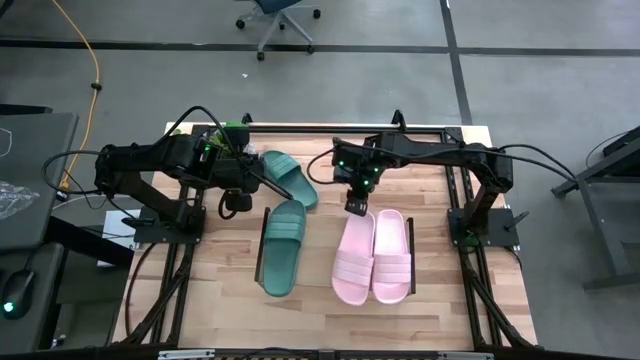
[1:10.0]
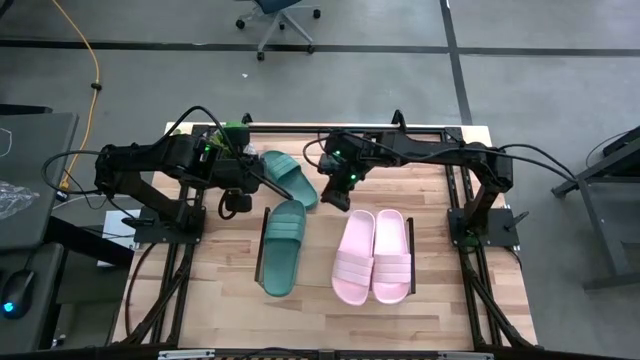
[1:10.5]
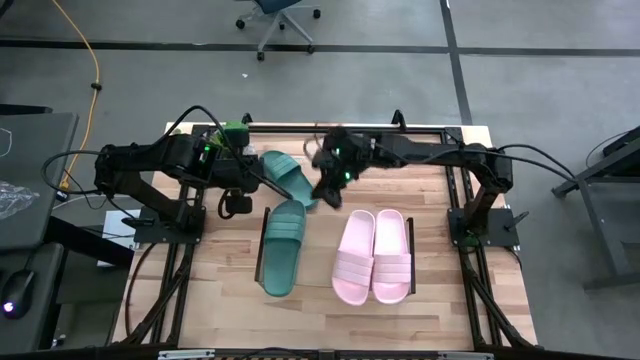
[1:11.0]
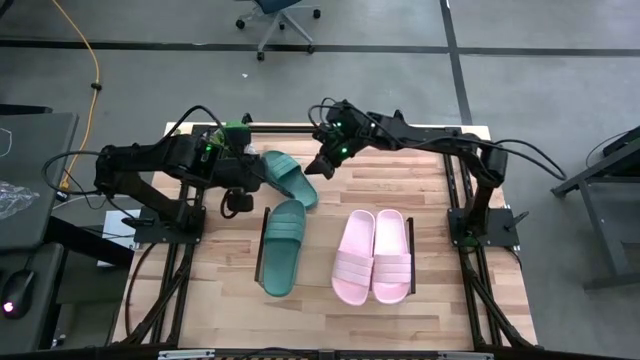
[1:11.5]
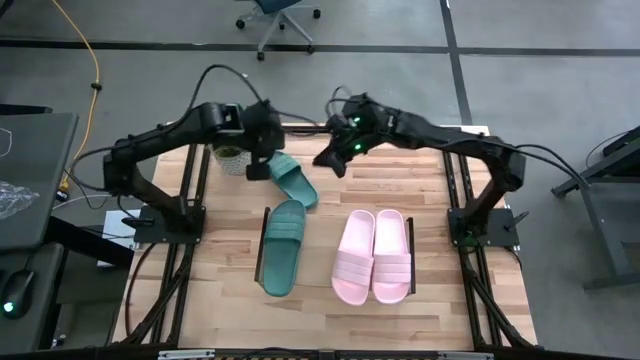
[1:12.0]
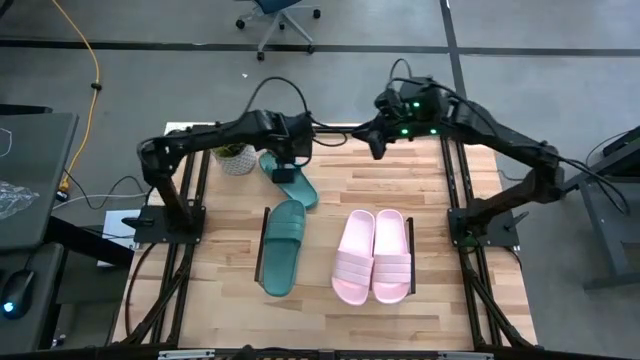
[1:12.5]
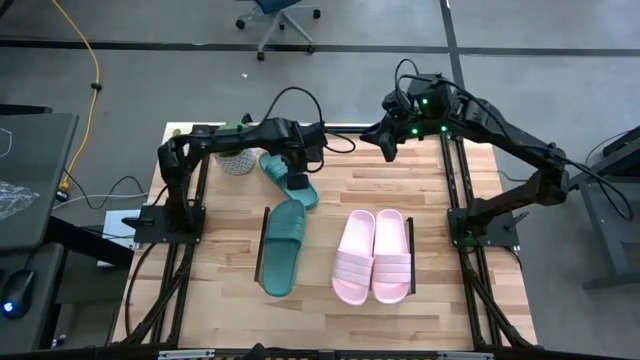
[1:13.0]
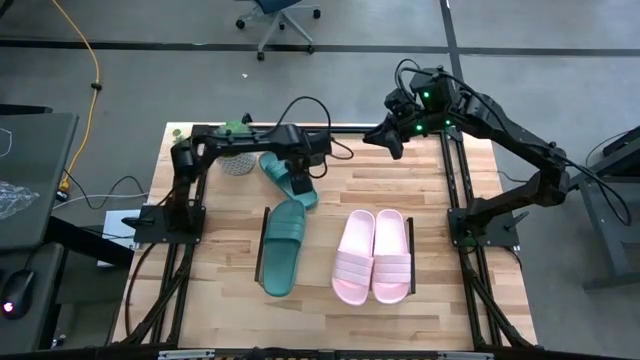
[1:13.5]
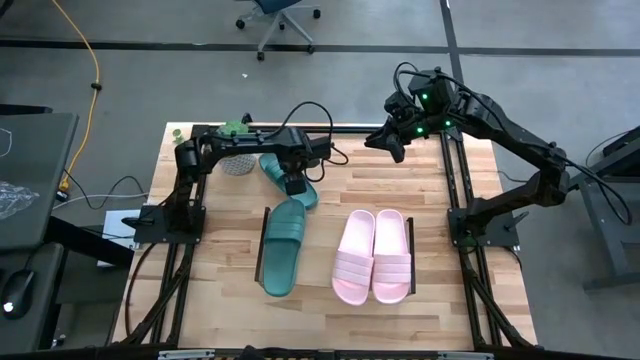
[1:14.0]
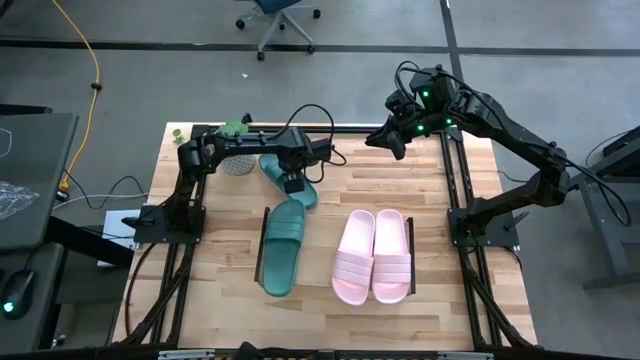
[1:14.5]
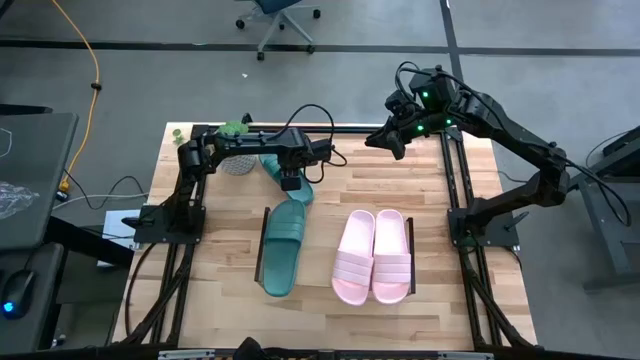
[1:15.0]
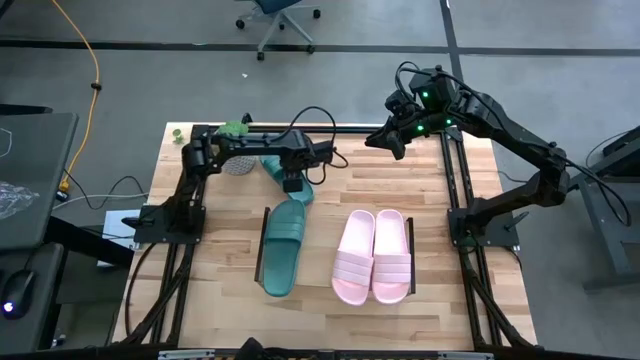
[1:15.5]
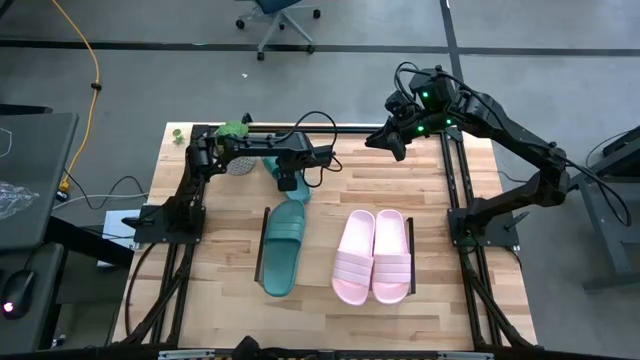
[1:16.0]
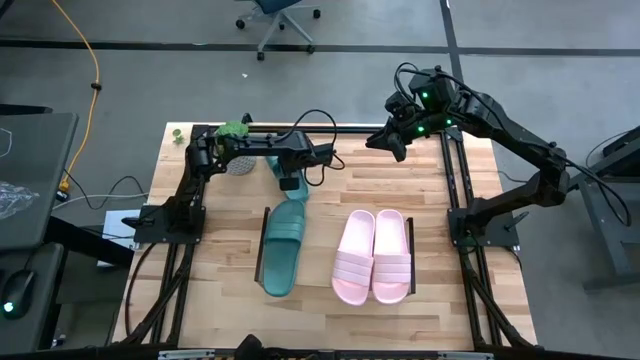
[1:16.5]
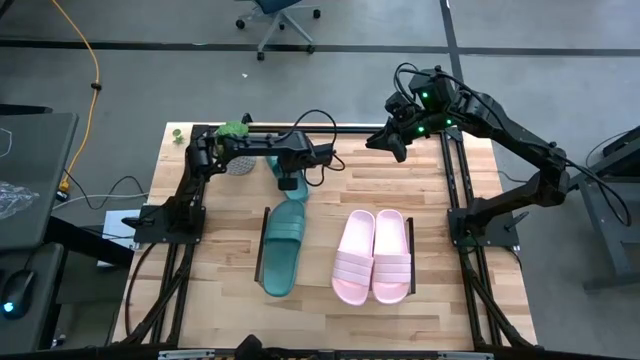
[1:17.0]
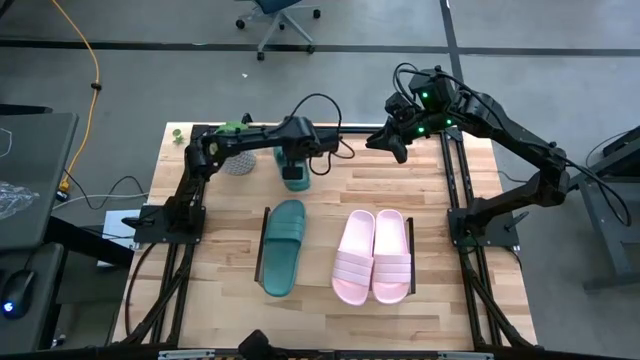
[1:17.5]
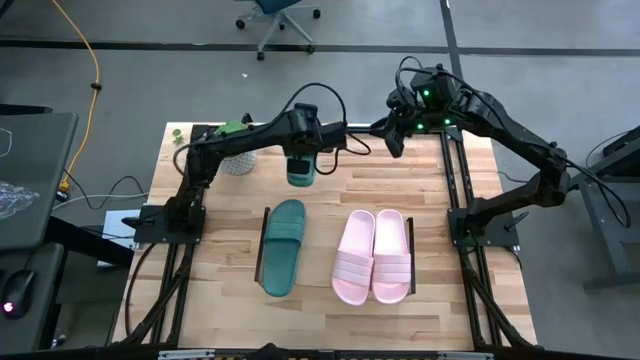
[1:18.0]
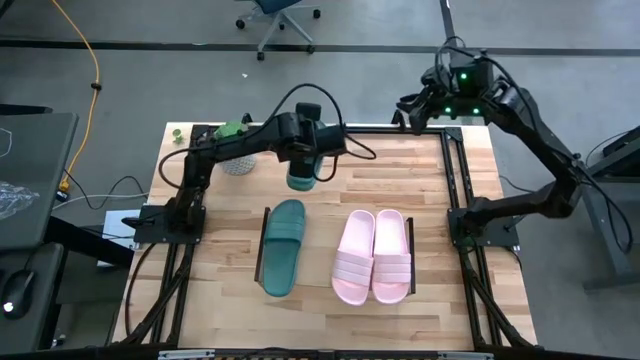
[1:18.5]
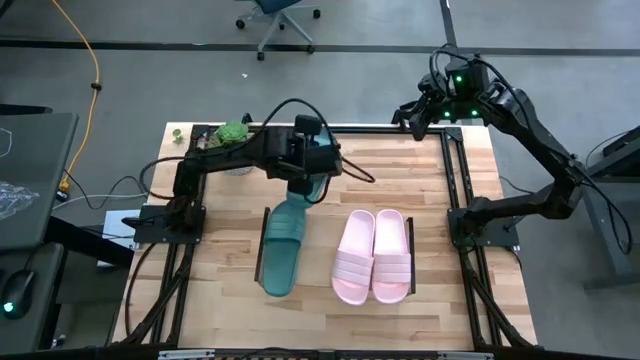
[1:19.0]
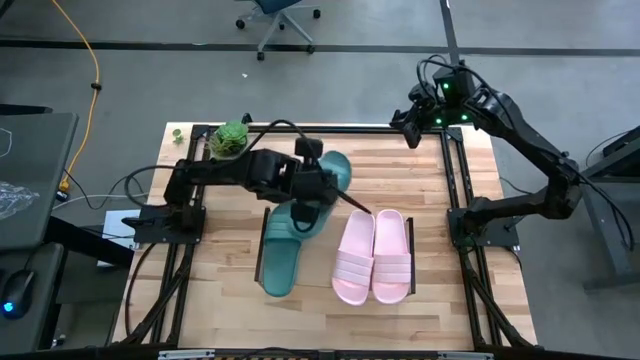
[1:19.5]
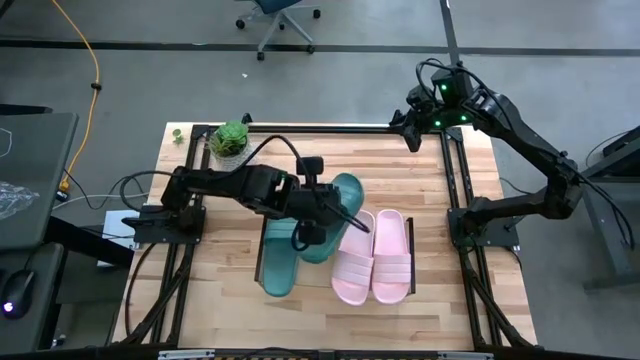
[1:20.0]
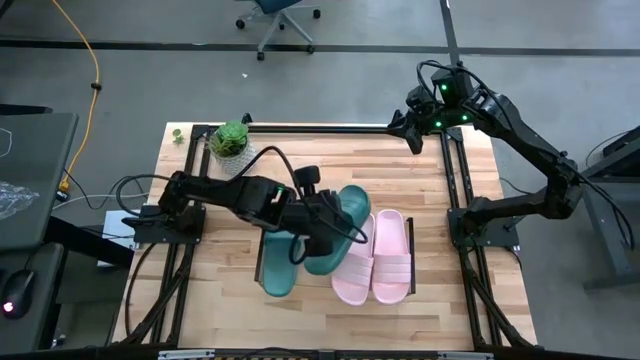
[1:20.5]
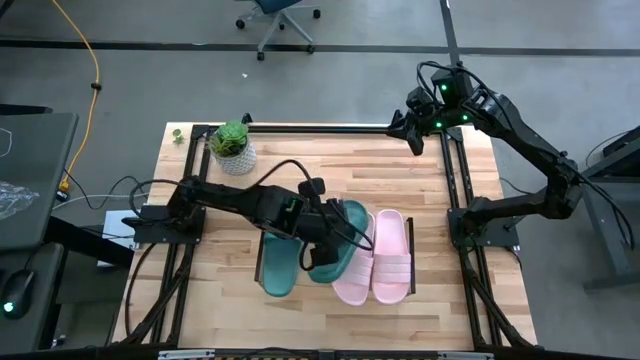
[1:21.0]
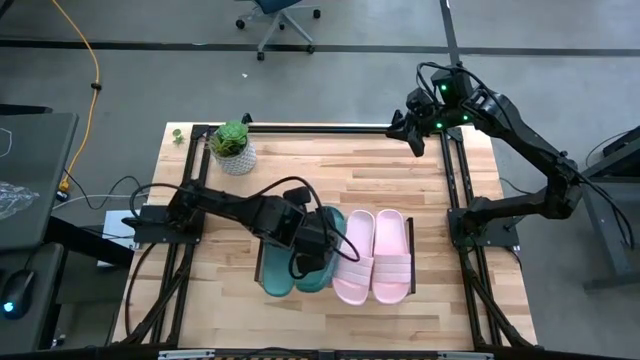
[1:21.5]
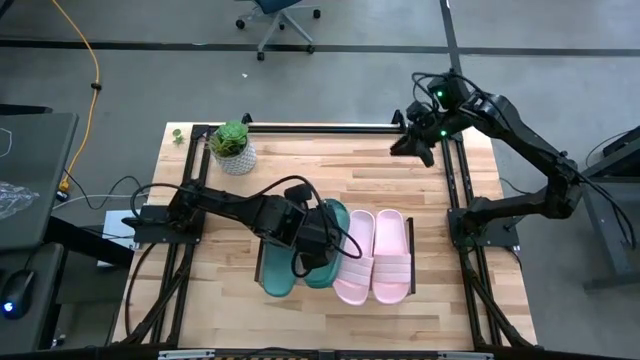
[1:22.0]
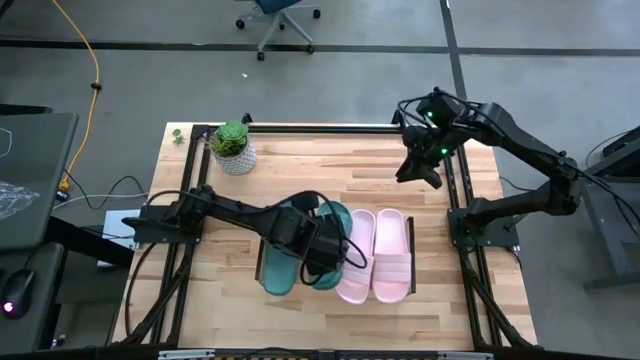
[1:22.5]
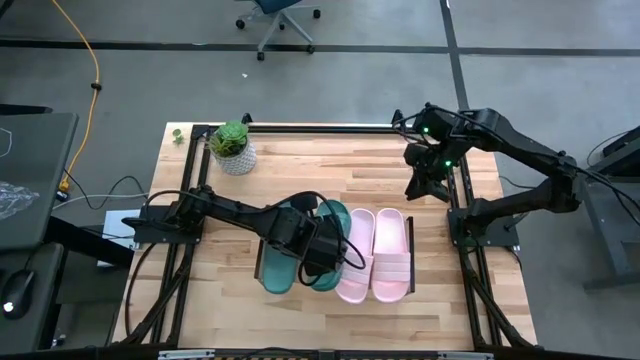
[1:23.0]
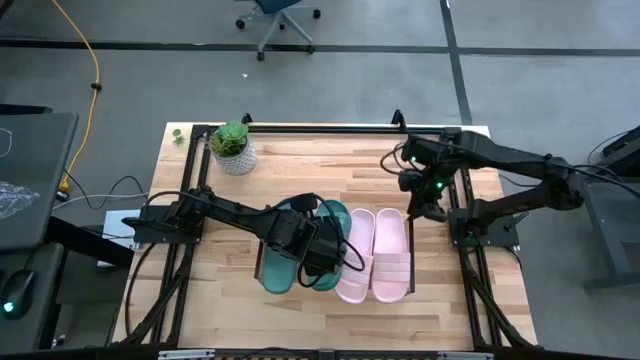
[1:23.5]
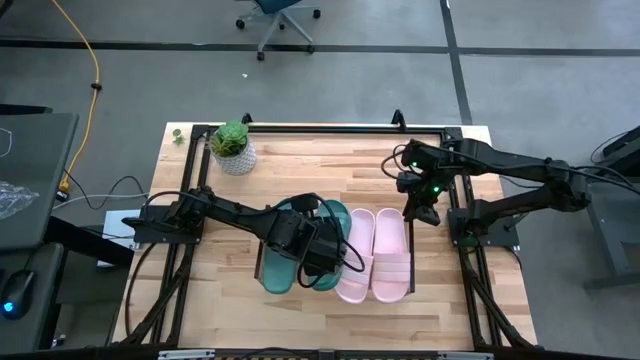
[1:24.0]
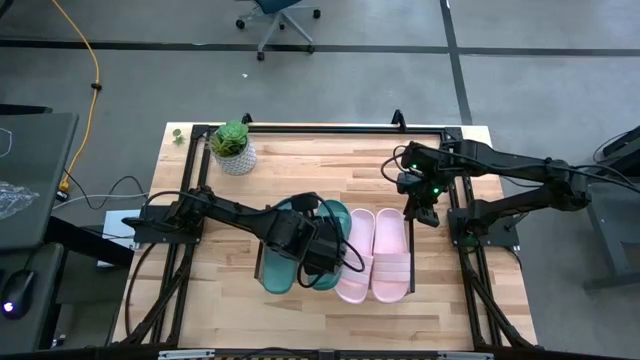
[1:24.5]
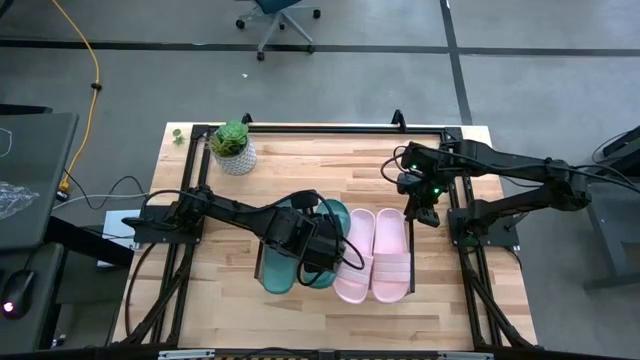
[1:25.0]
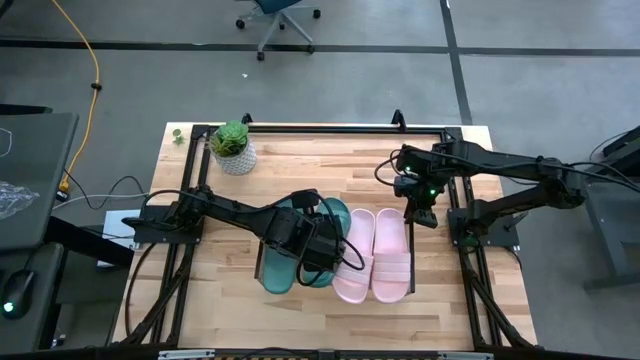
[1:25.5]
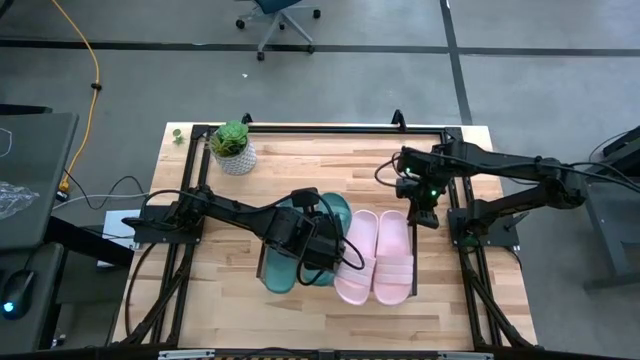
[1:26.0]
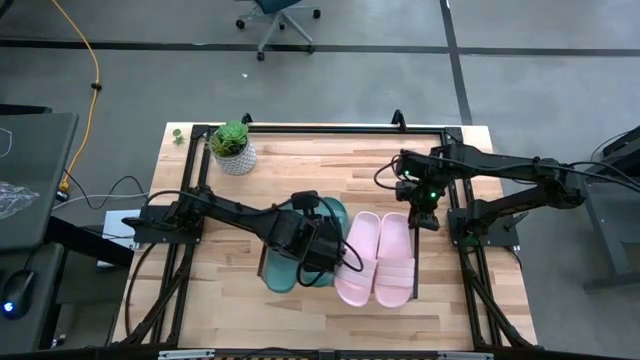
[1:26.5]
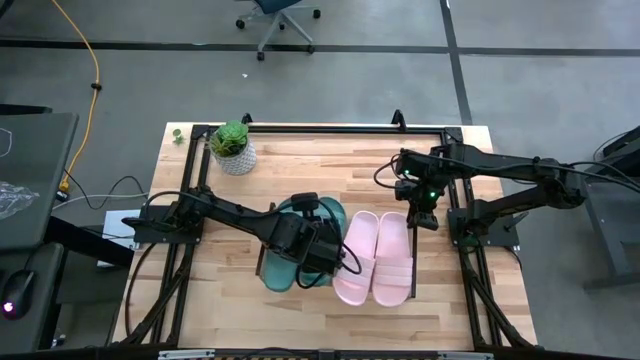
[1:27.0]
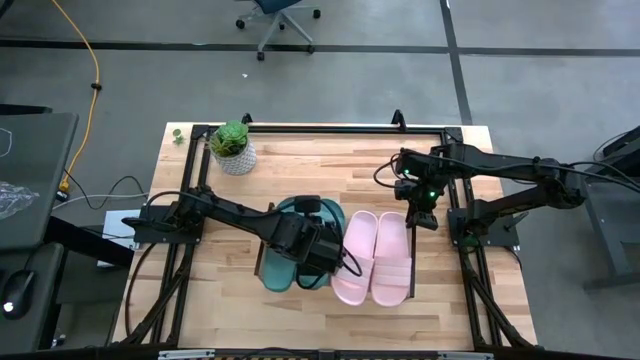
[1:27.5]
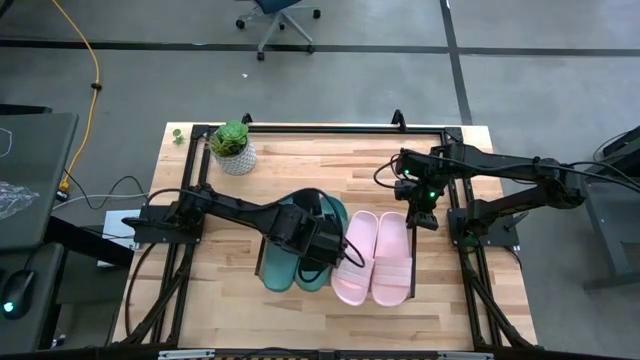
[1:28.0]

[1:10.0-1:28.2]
Task: Pick and place slides into the shelf
Put the green slide on the shelf

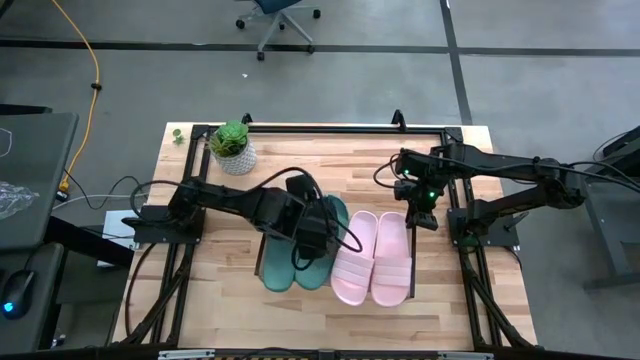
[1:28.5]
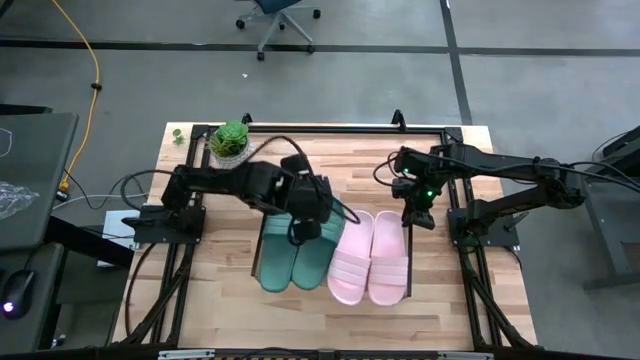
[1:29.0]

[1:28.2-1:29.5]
Adjust the right pink slide

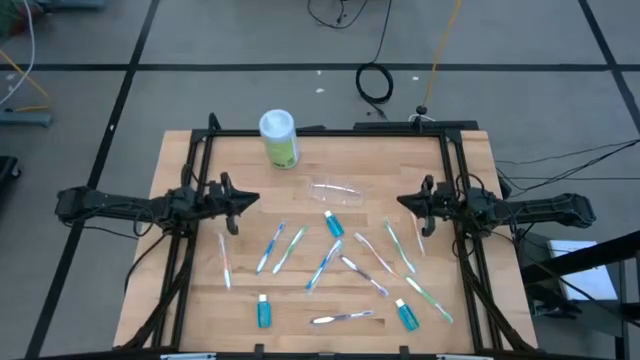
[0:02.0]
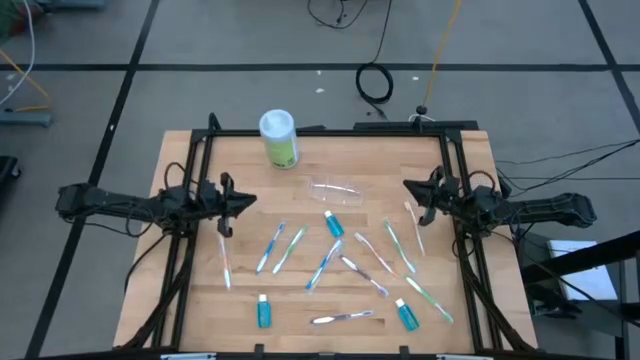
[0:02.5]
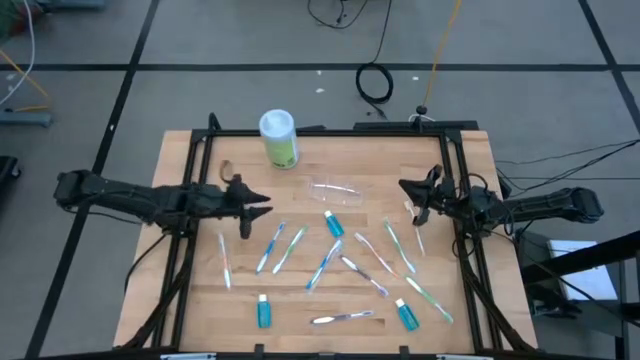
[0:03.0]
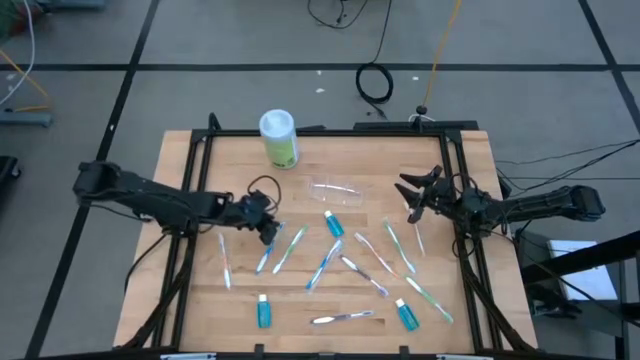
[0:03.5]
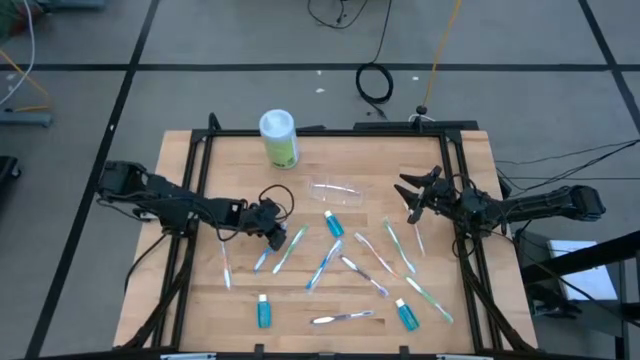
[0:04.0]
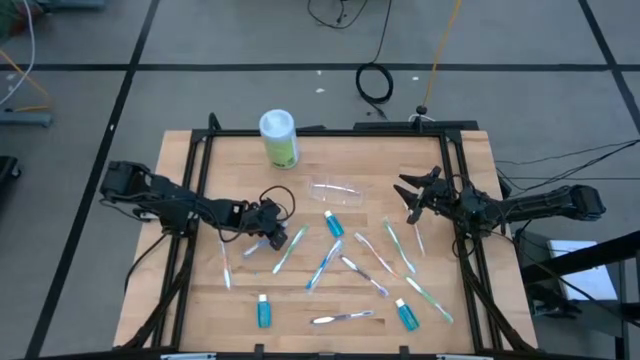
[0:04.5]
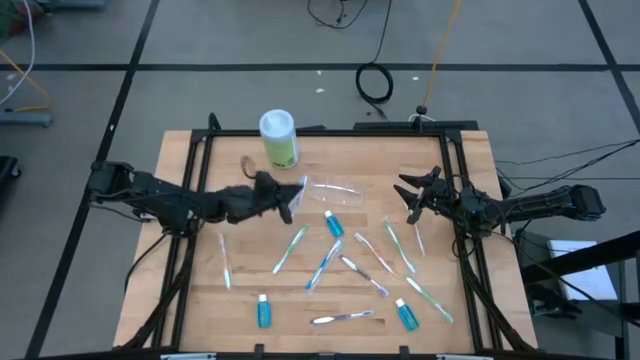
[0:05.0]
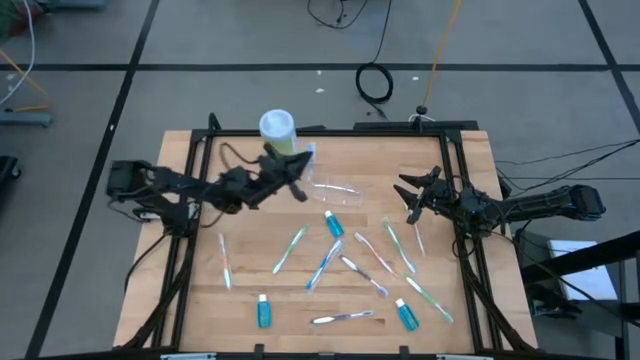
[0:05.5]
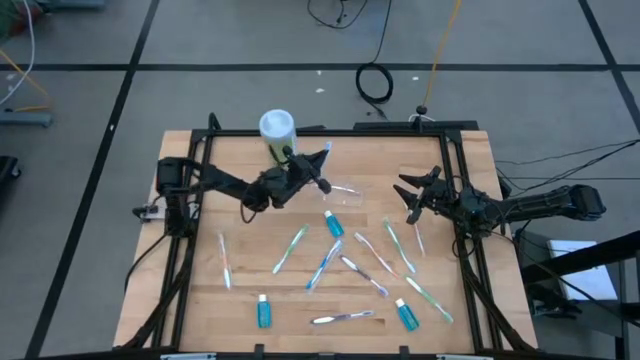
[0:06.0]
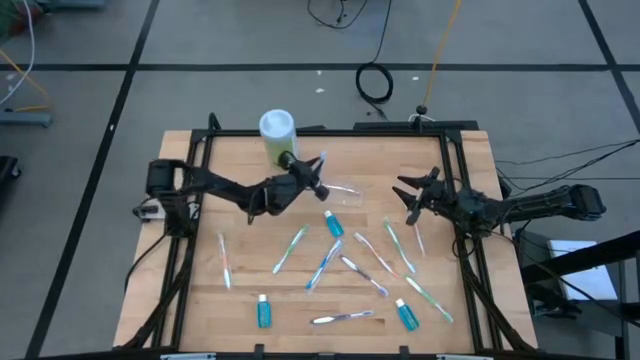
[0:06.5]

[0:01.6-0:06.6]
Task: Pick & Place toothbrushing station
Put the left blue toothbrush into the transparent organizer
